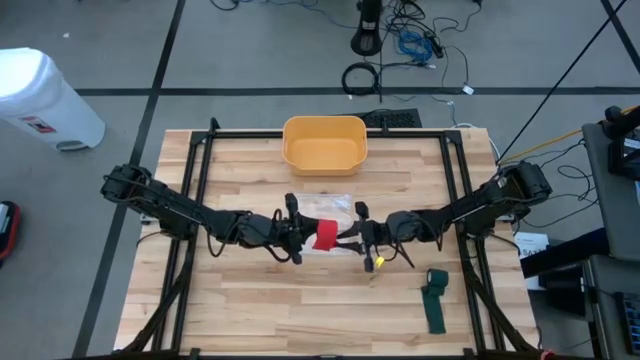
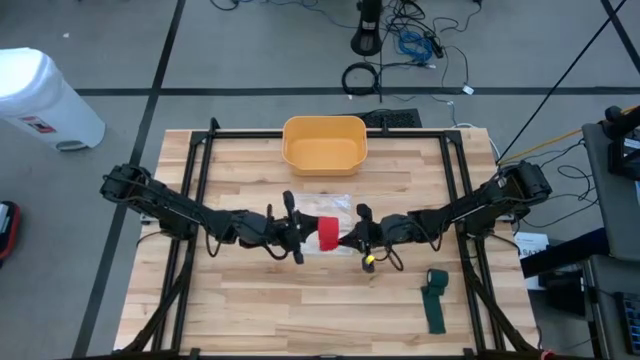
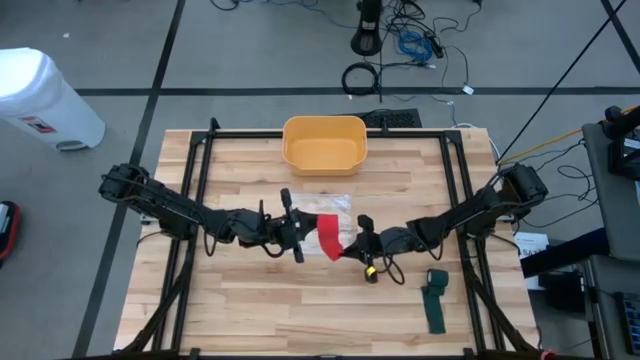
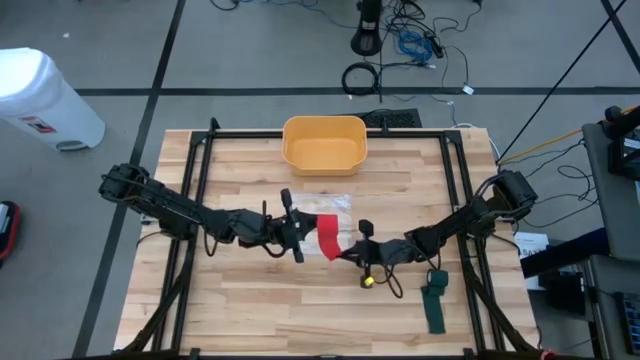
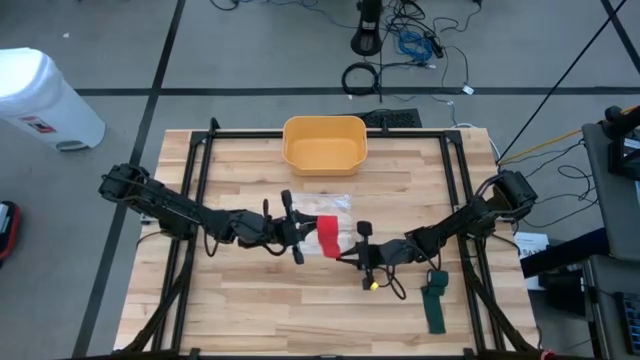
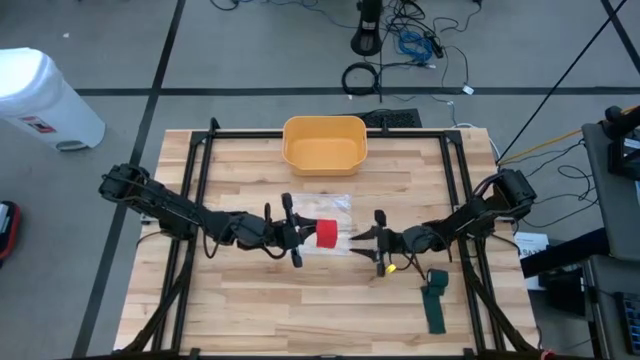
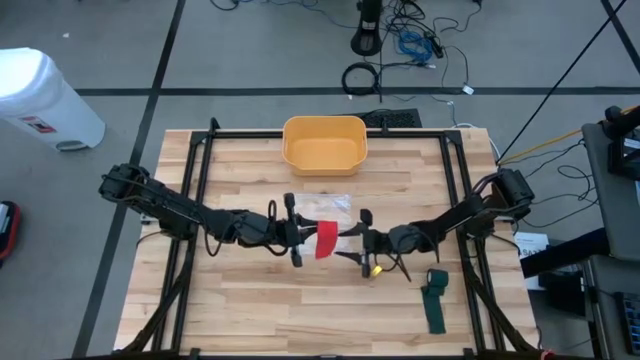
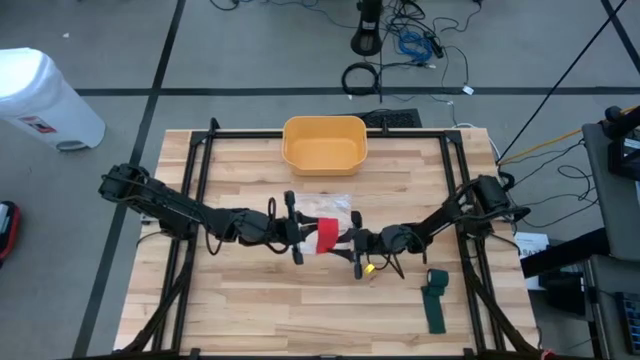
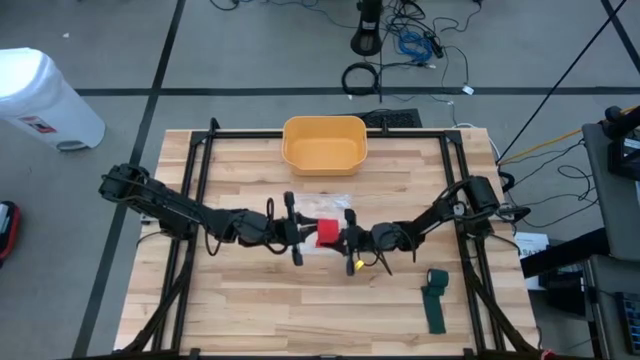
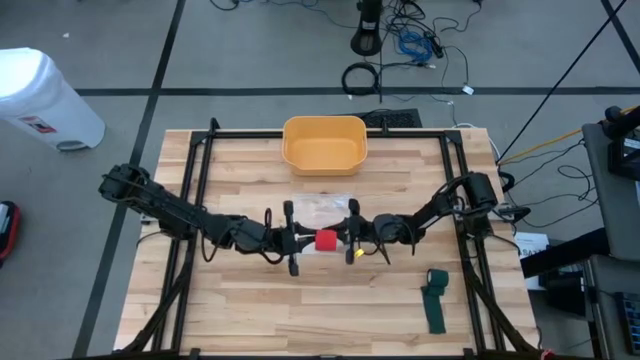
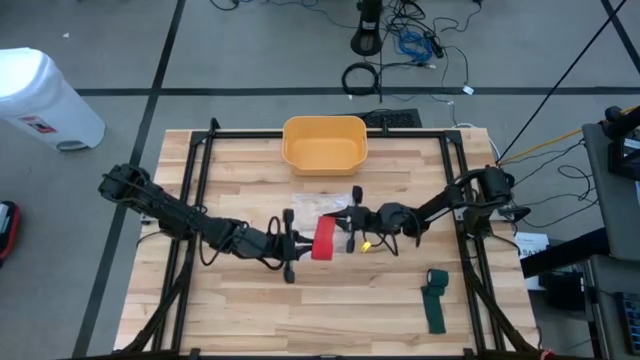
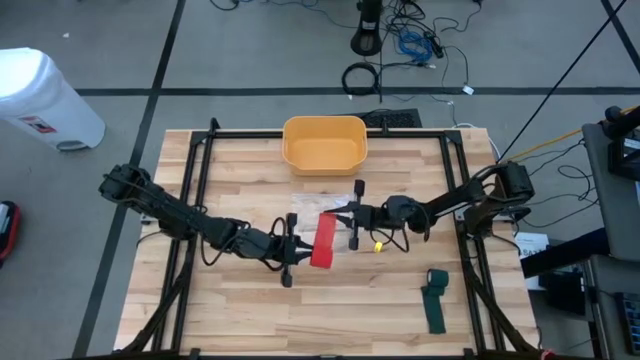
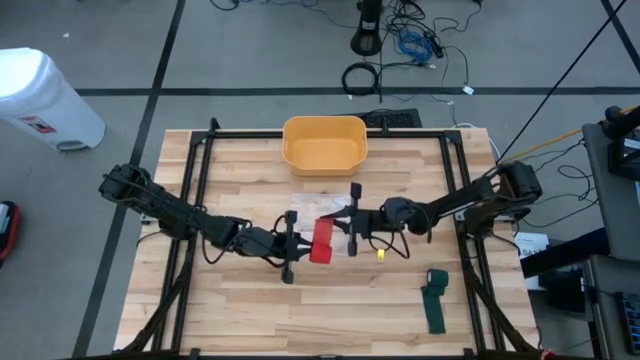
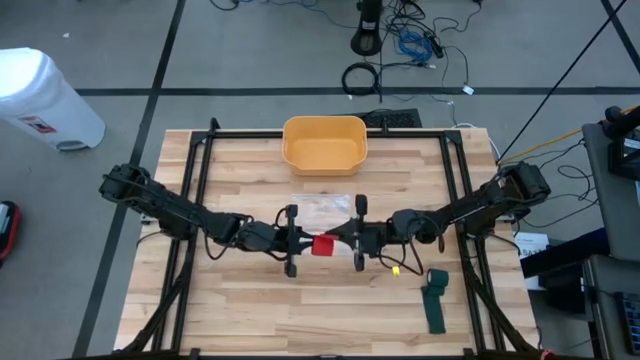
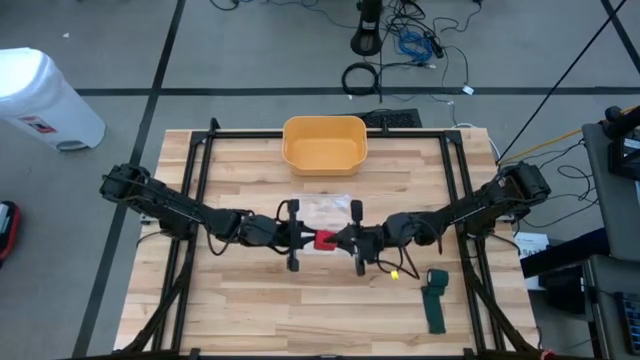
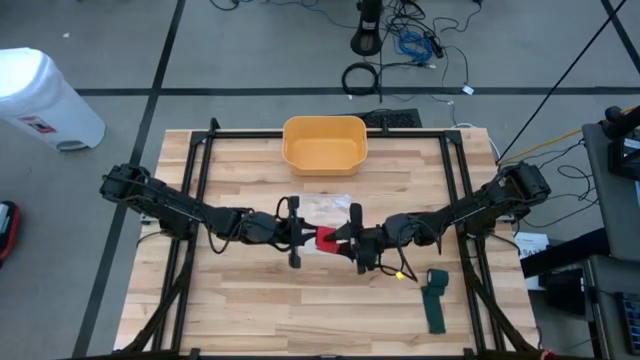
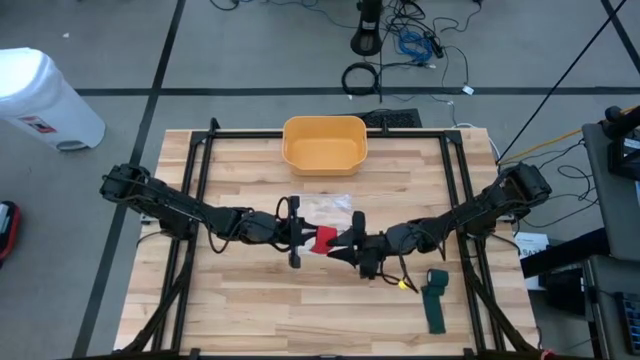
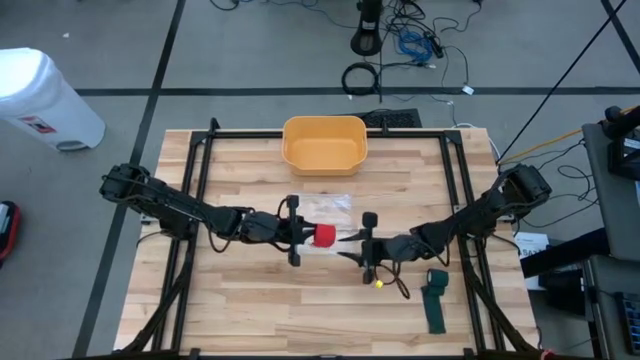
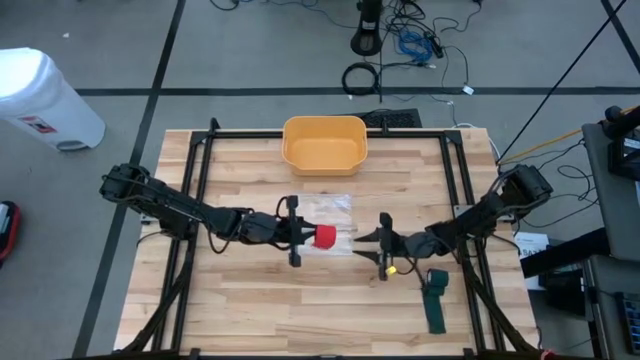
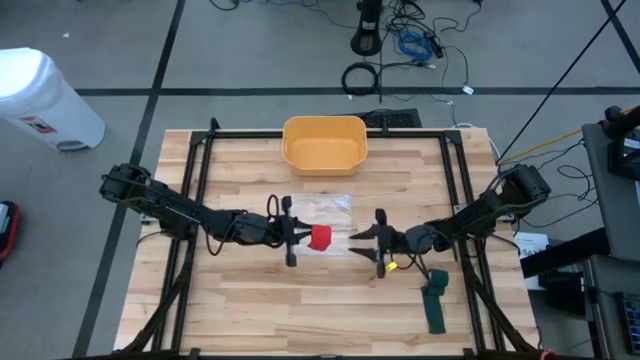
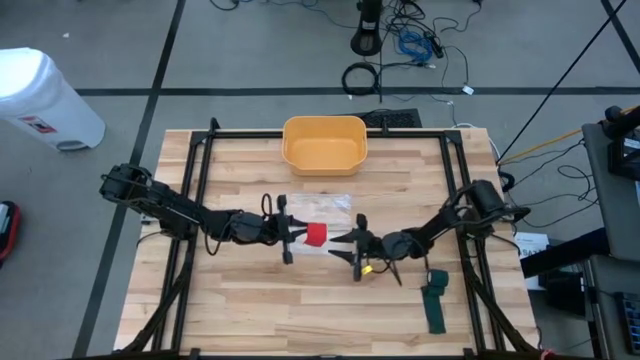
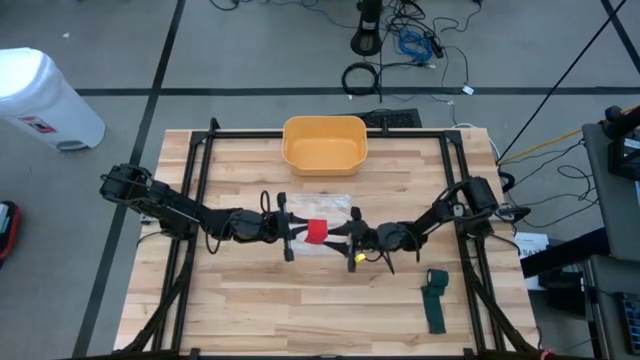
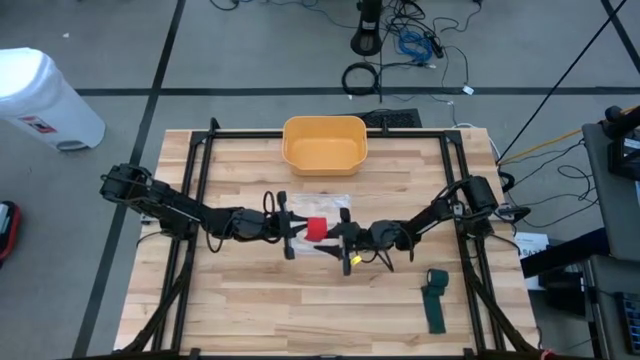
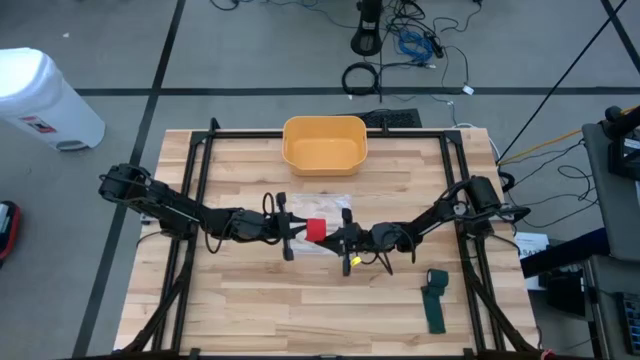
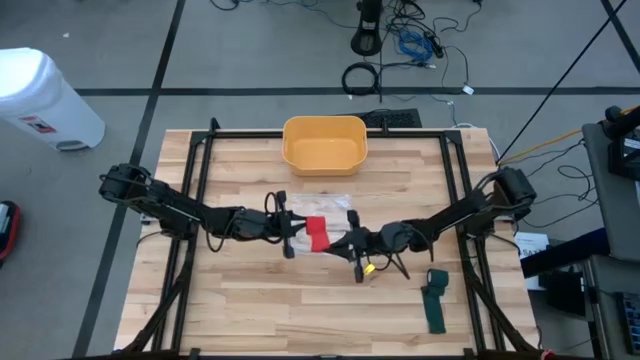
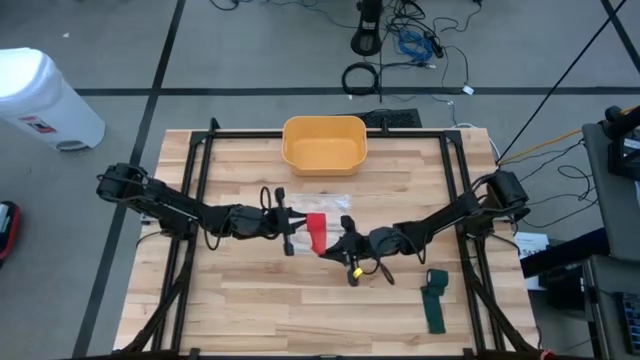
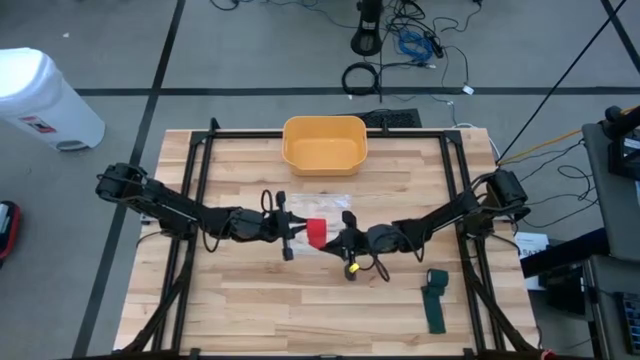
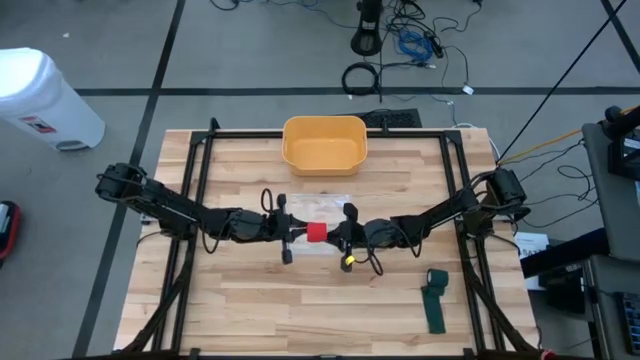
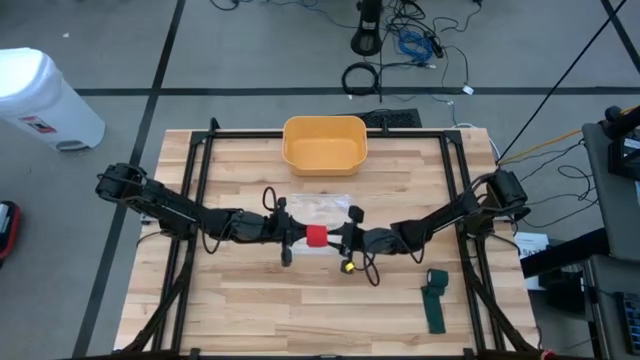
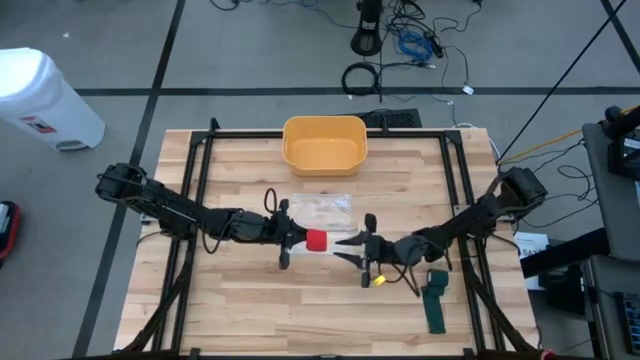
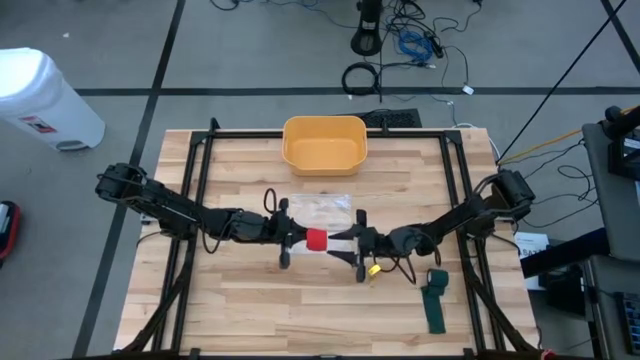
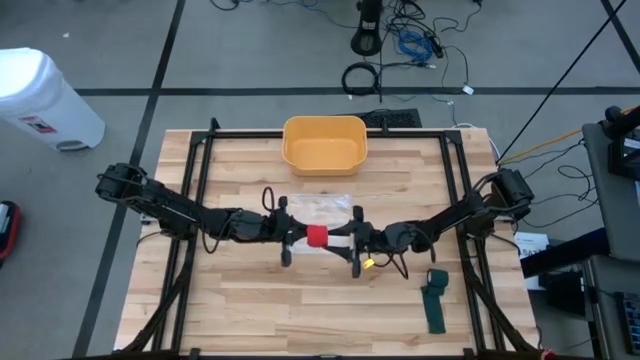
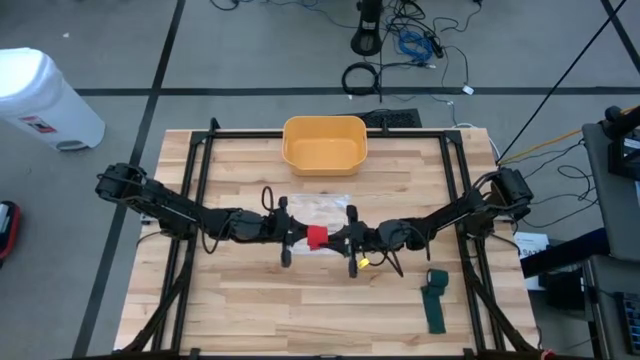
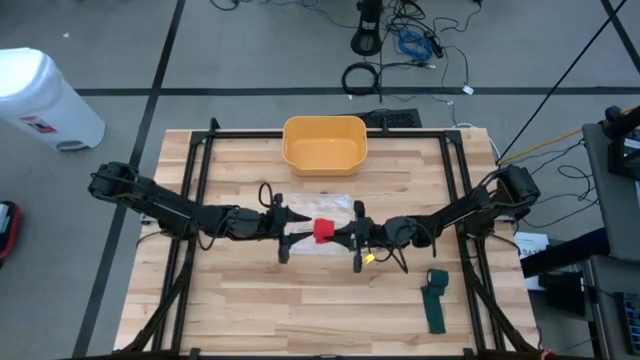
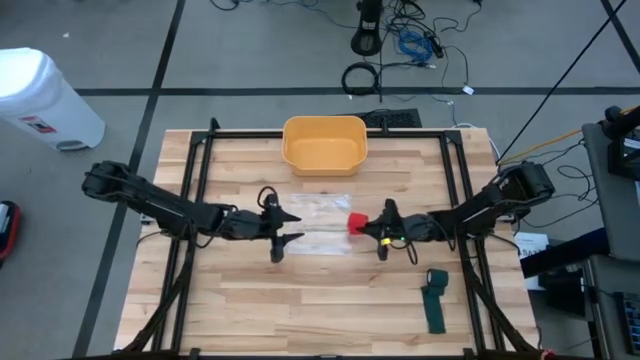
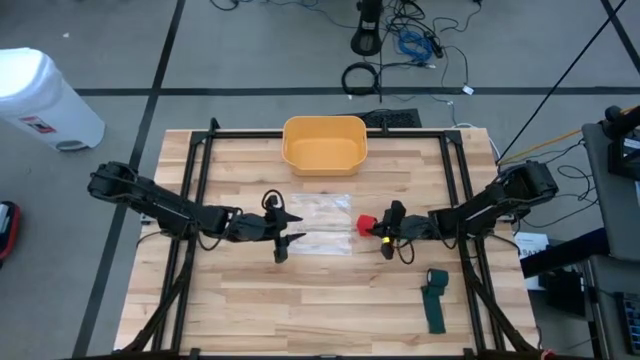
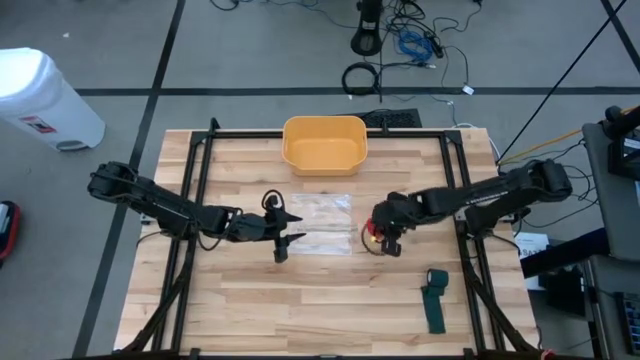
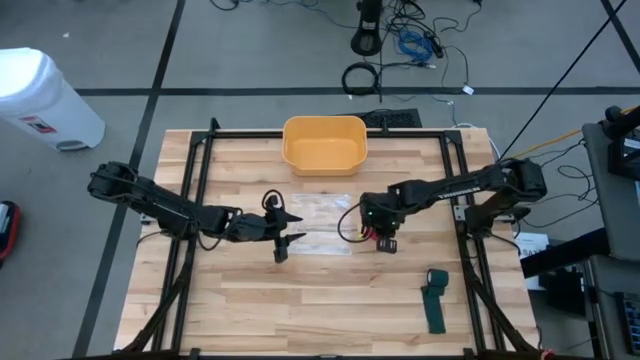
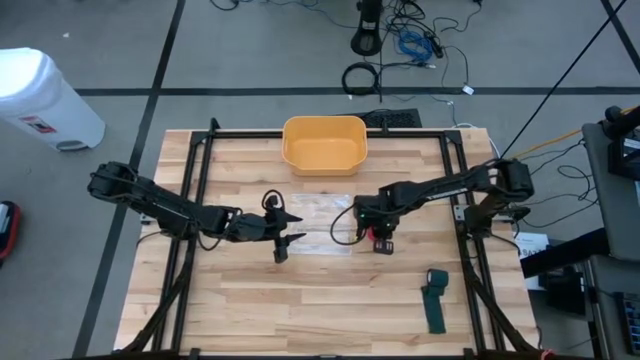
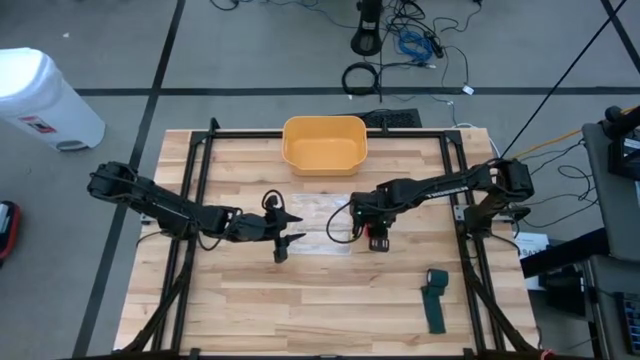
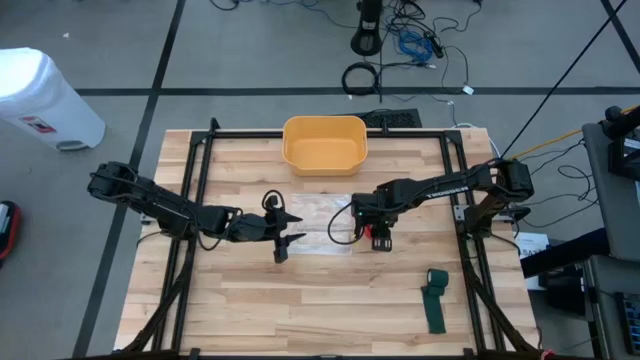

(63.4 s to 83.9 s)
Task: Roll bandage
Roll the red bandage
